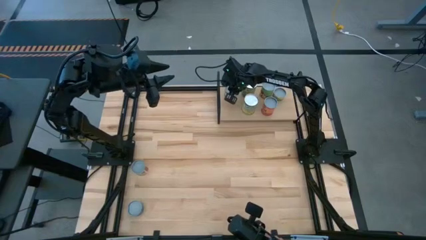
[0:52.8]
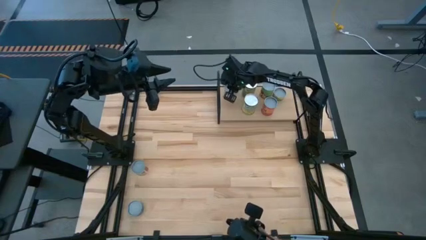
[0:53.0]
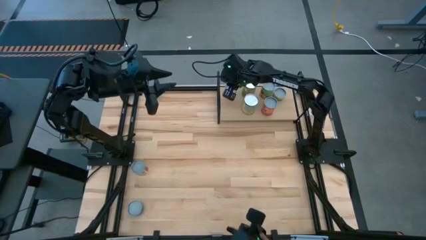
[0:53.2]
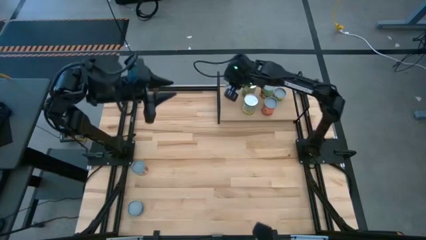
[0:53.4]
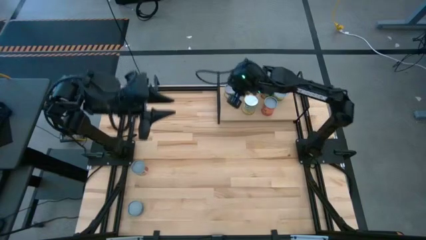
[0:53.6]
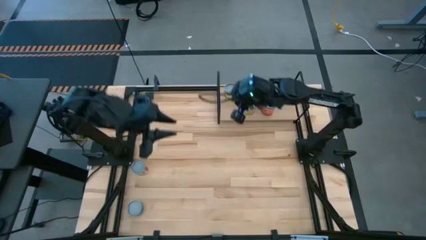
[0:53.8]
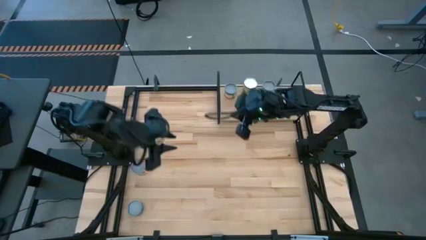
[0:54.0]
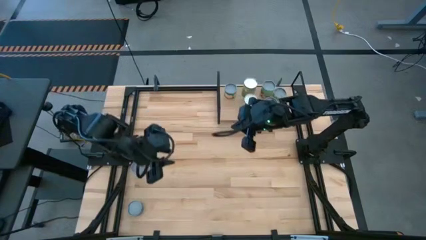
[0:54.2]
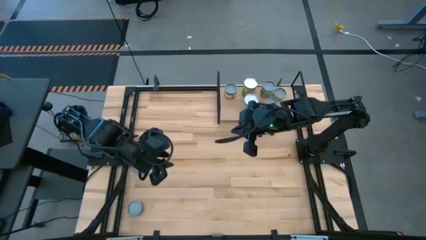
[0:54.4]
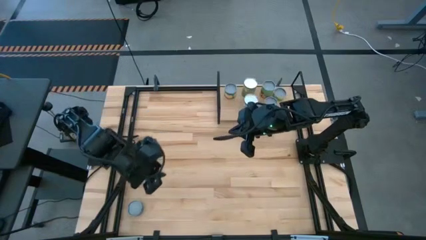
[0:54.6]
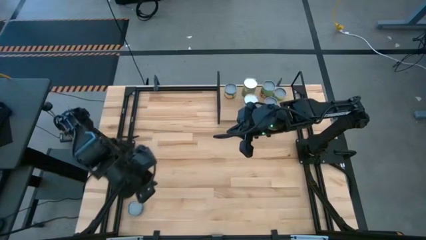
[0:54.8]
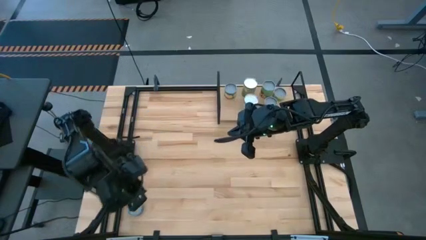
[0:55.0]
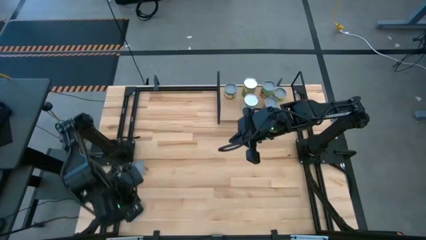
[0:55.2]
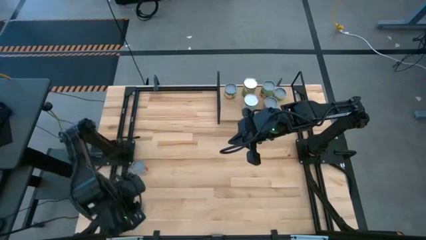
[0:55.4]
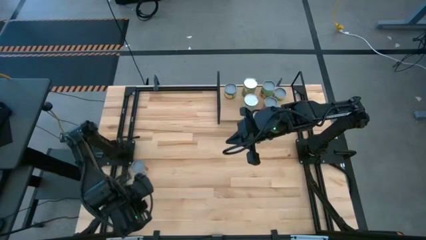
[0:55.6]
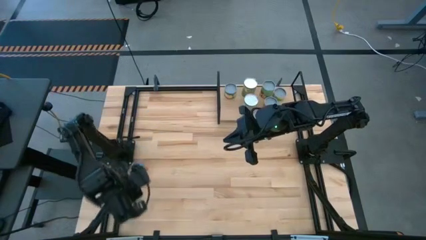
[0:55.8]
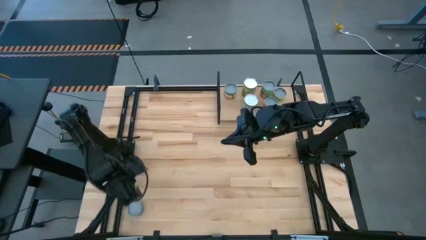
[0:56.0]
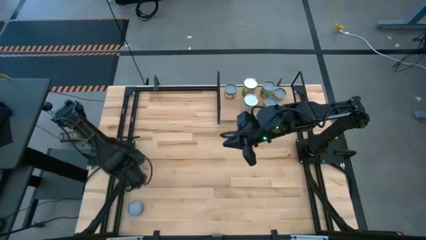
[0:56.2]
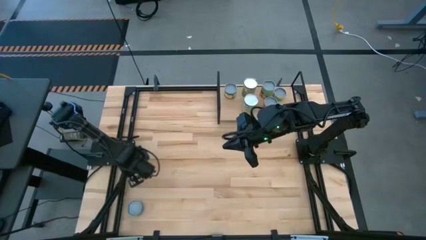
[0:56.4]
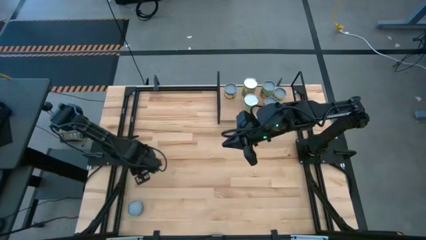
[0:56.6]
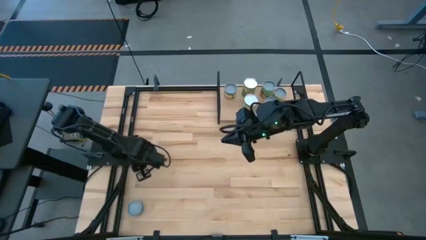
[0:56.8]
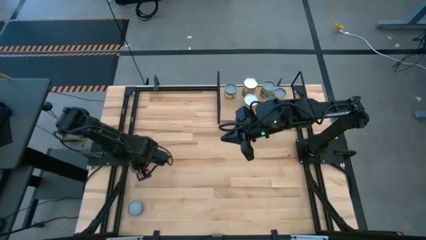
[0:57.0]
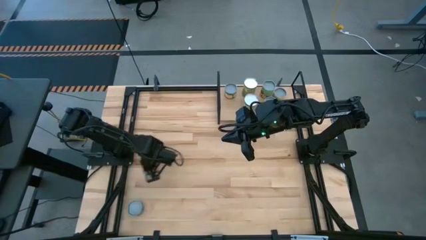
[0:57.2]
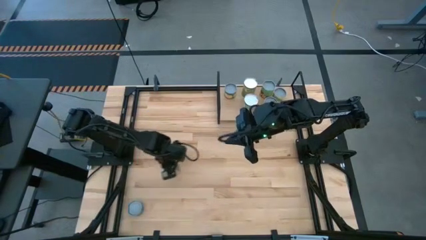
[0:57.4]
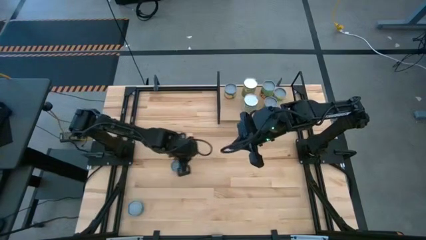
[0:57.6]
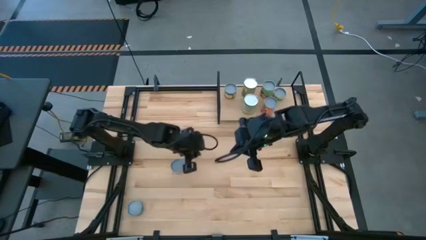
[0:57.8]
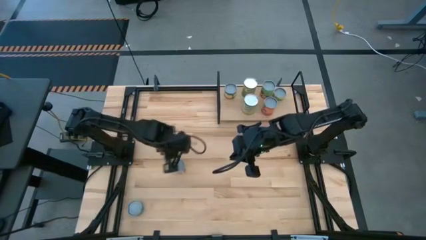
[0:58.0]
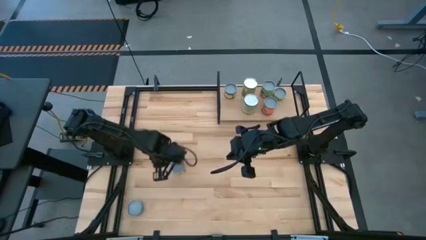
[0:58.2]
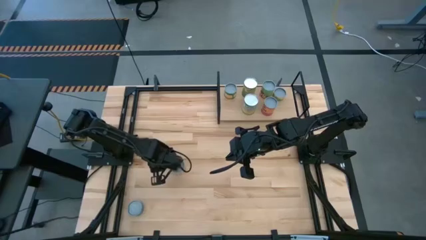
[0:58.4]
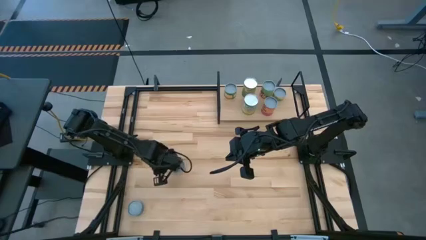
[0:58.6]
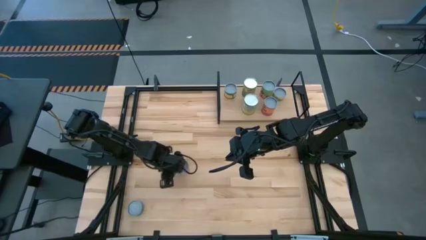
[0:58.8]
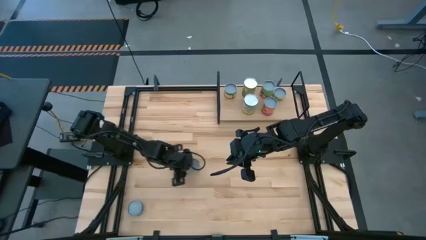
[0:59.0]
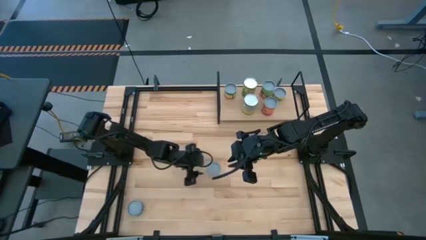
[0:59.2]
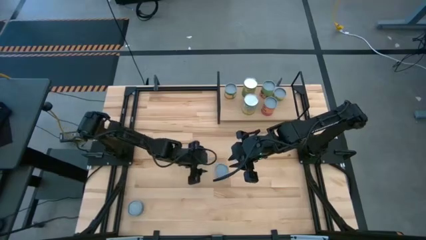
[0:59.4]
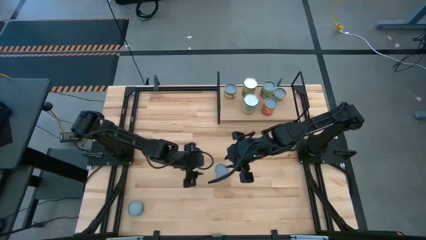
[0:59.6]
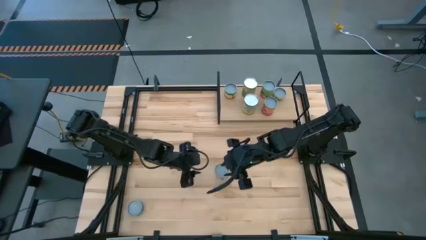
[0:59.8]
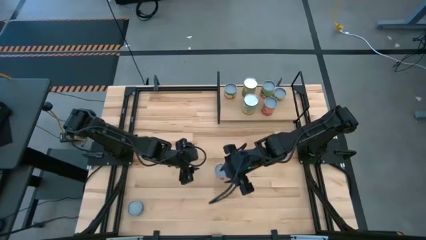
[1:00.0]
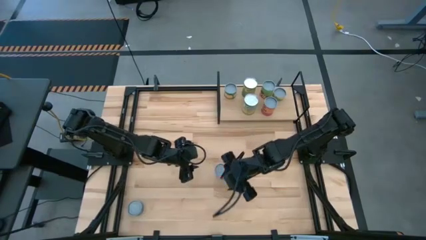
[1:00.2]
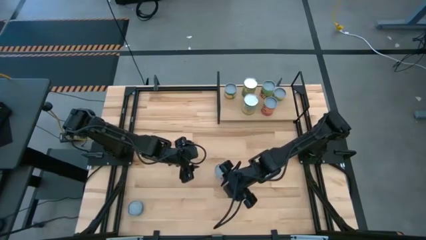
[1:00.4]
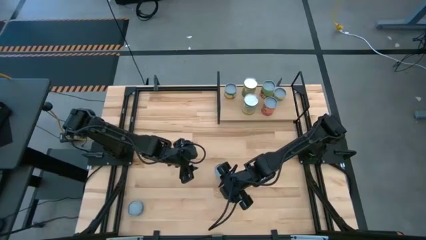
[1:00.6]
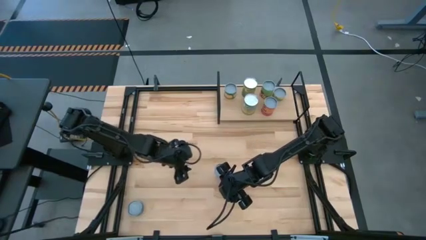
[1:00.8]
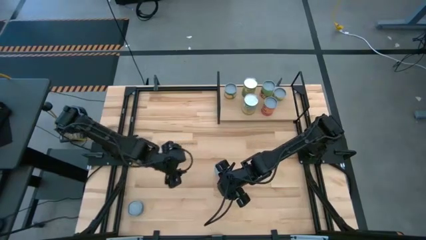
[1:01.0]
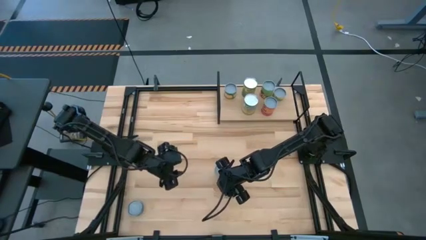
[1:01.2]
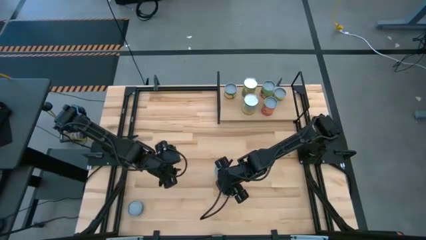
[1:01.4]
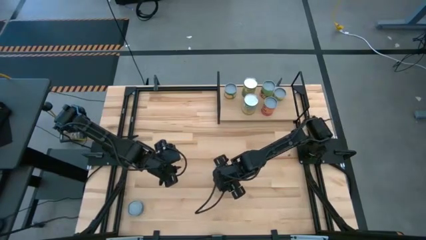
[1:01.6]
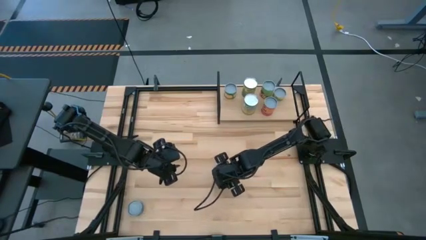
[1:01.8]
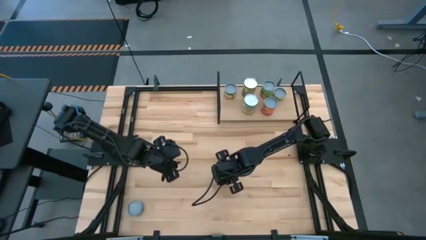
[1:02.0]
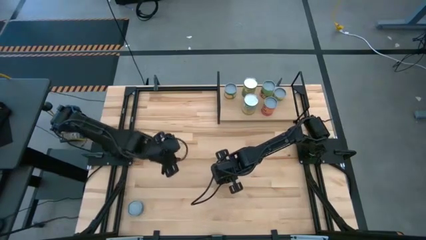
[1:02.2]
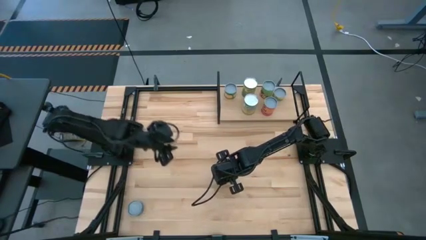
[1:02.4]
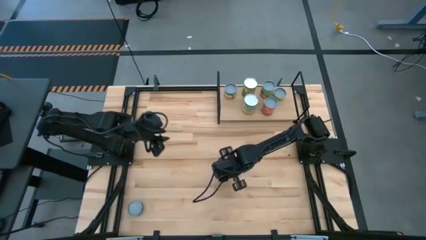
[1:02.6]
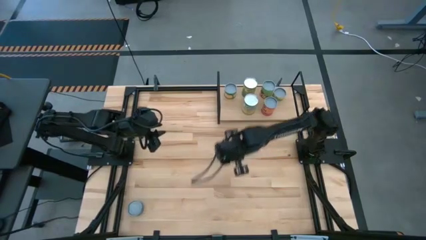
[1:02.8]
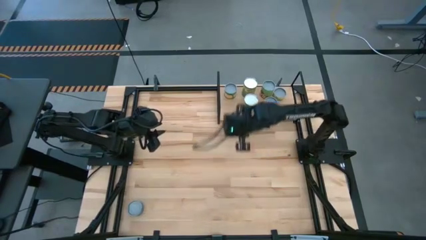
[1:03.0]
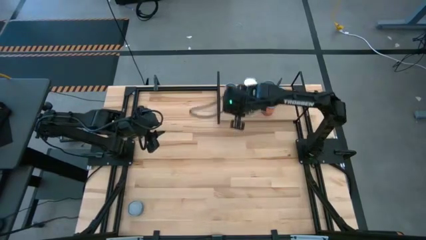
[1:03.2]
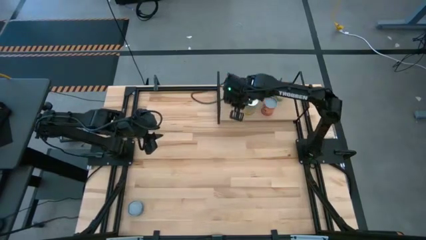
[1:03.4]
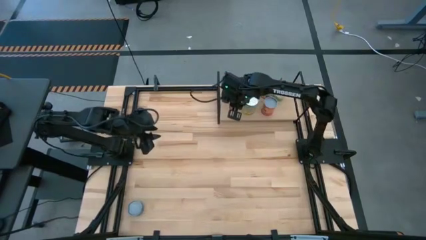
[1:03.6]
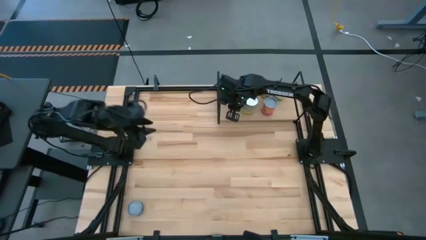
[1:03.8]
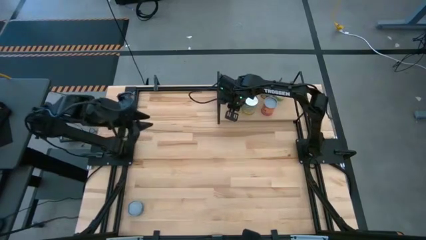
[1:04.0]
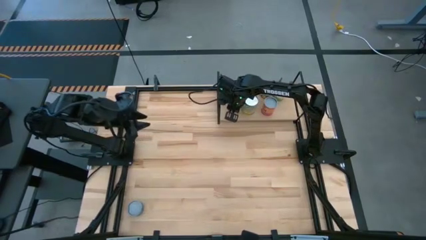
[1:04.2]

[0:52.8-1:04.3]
Task: Pick and place cans onto a shelf
Put the red/white can on the shelf

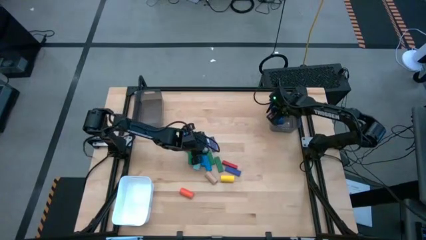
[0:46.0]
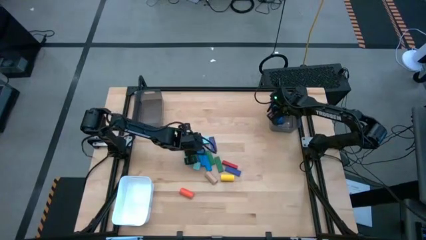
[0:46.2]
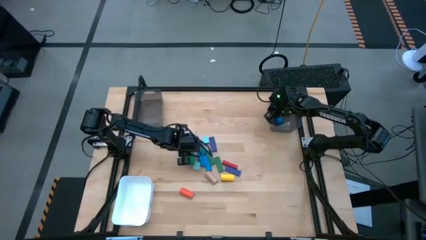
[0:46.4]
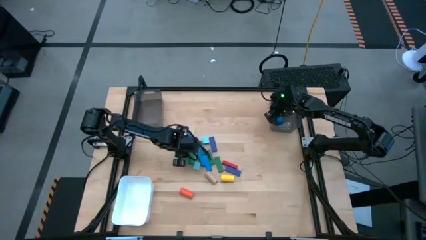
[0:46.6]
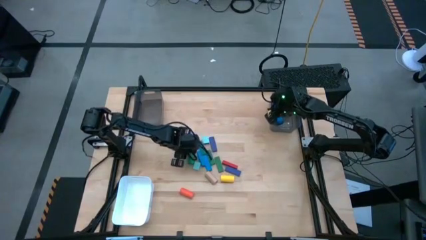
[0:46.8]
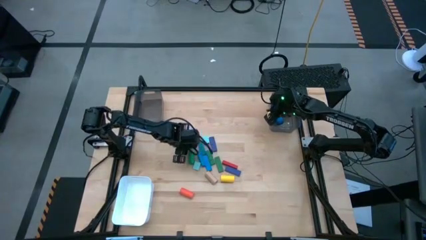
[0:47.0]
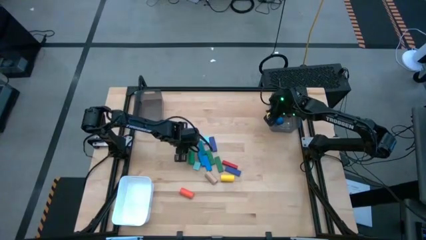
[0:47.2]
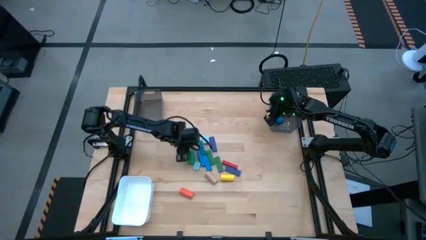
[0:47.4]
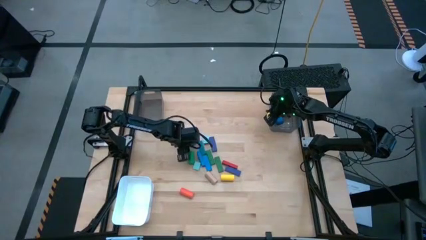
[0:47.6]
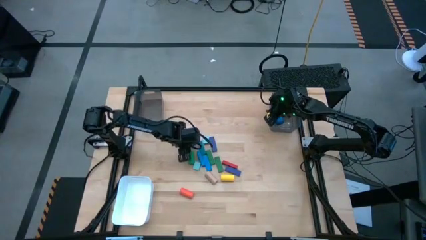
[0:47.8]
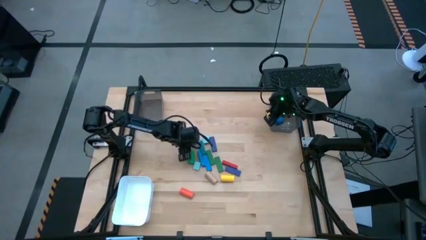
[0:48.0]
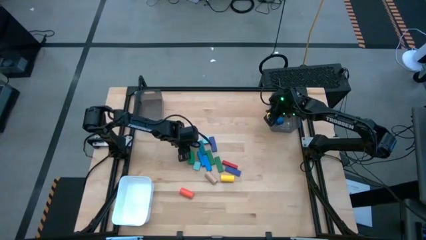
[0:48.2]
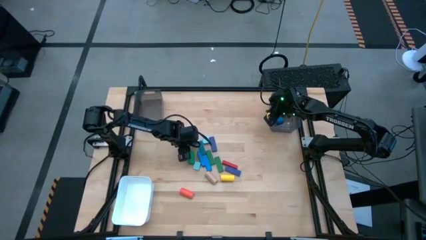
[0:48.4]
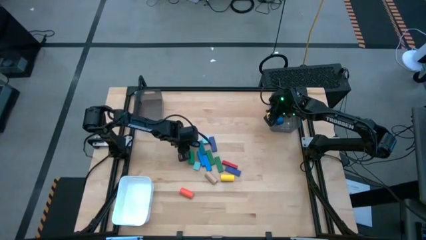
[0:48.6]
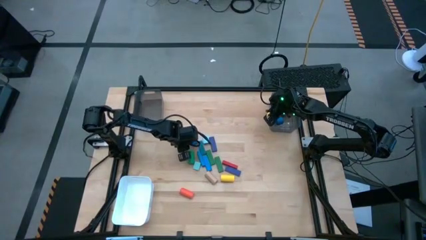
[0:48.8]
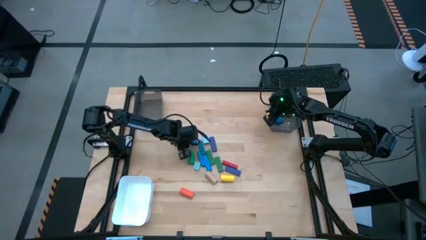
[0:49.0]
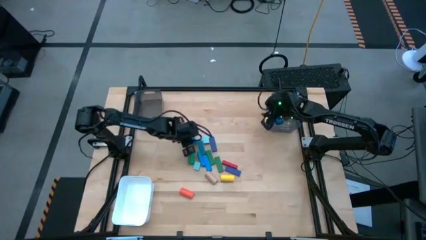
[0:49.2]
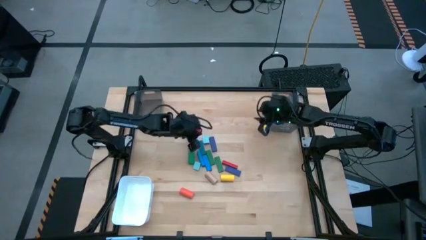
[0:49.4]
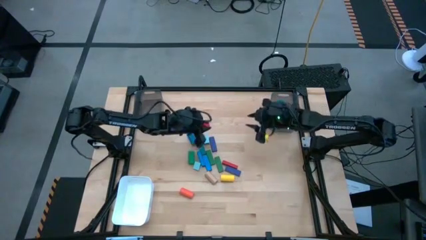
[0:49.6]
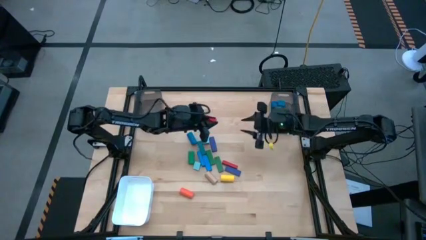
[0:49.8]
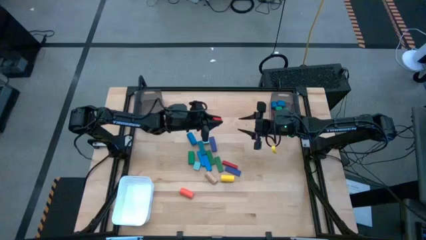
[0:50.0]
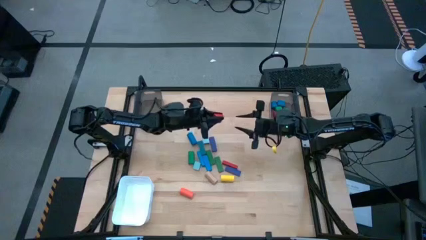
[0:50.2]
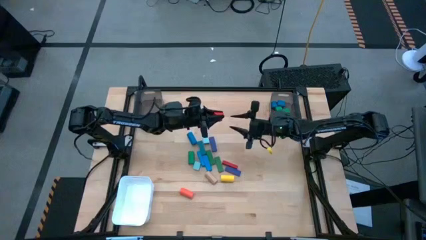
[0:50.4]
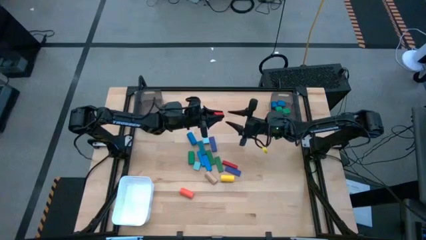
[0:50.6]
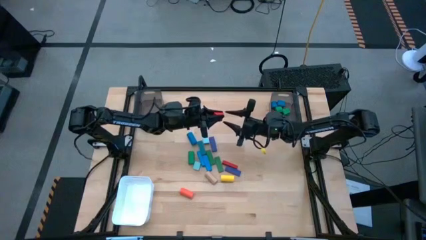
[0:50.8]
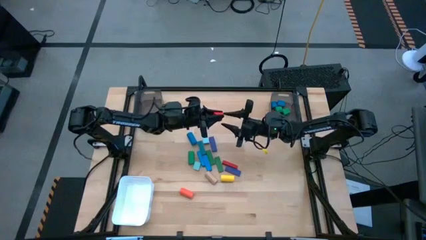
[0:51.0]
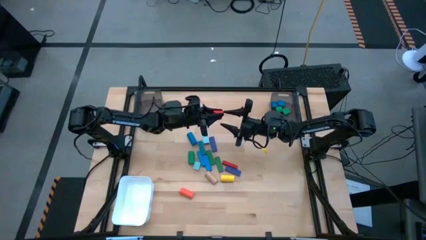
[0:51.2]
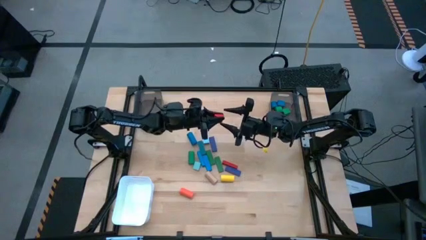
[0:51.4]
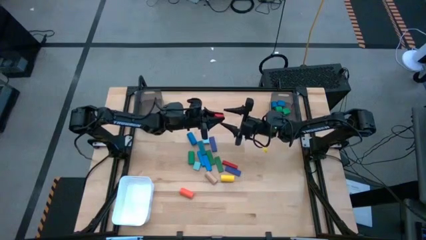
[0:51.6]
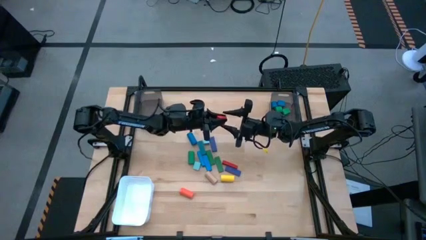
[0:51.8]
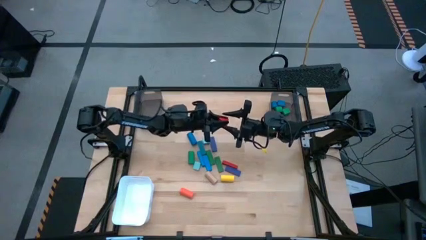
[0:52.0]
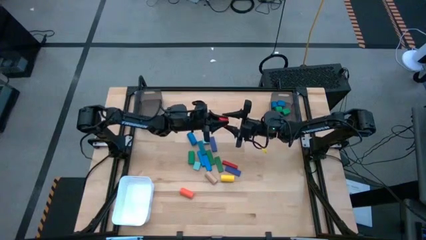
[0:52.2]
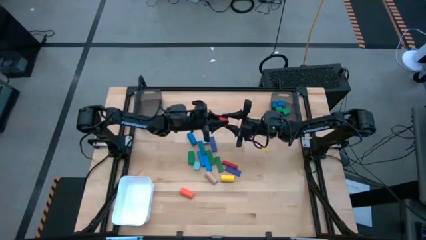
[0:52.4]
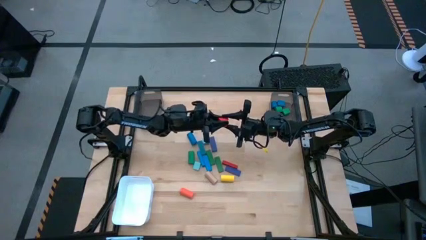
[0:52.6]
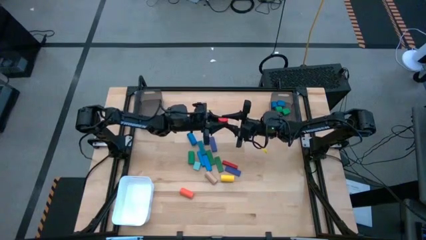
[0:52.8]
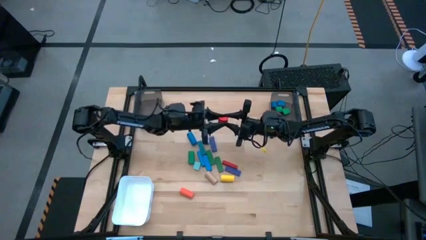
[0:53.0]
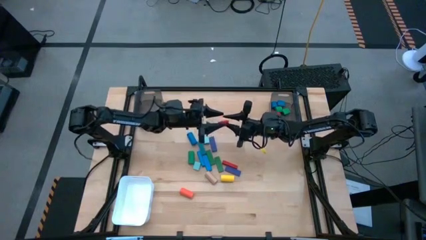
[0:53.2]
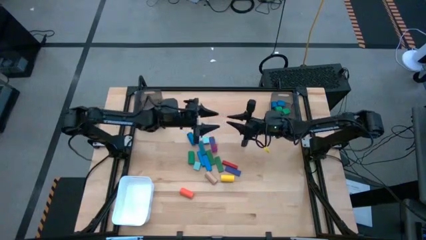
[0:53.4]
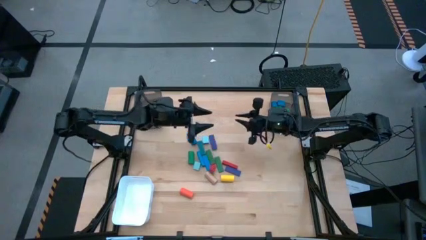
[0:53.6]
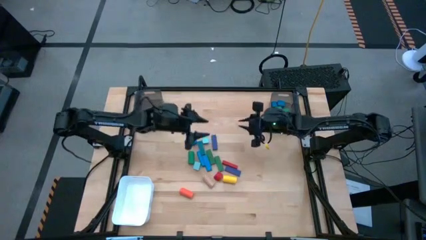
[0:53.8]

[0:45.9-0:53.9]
Task: Sort blocks by size
Put the red half circle block into the right black bin
